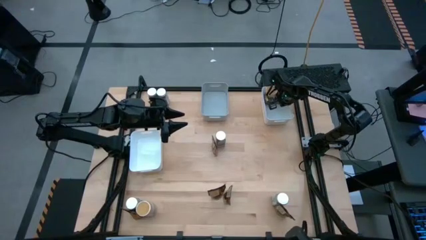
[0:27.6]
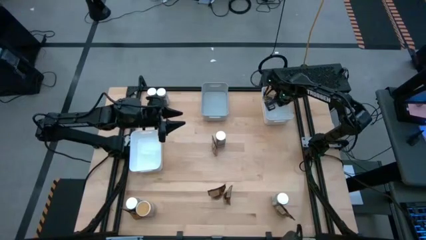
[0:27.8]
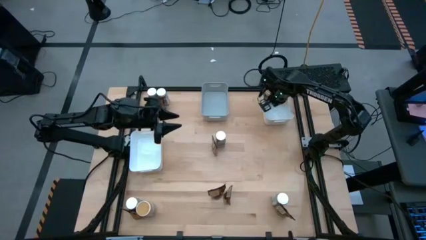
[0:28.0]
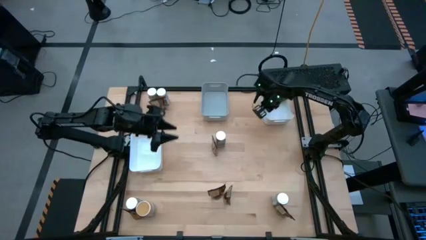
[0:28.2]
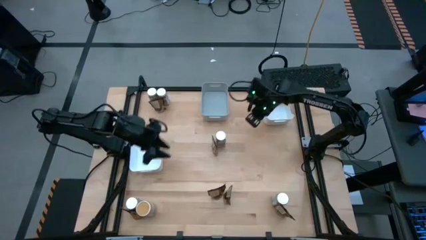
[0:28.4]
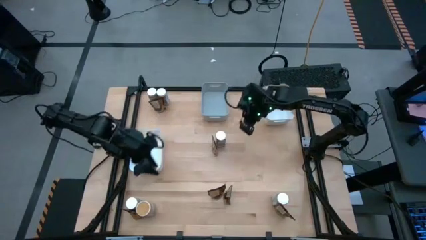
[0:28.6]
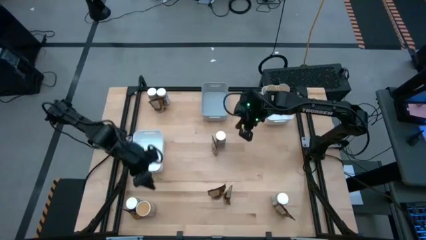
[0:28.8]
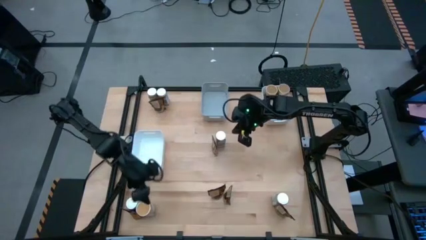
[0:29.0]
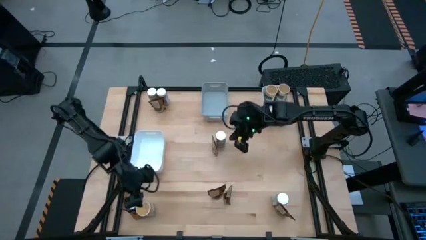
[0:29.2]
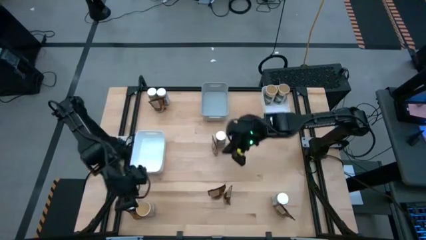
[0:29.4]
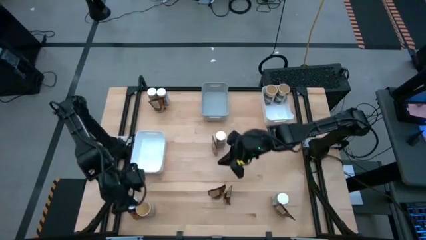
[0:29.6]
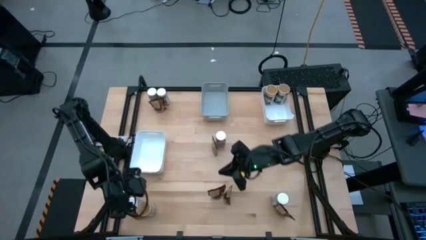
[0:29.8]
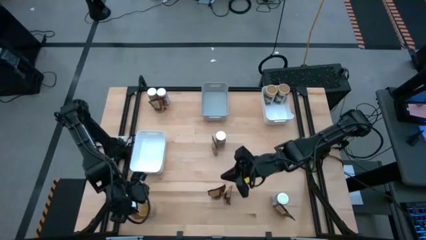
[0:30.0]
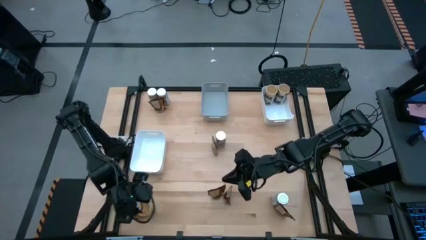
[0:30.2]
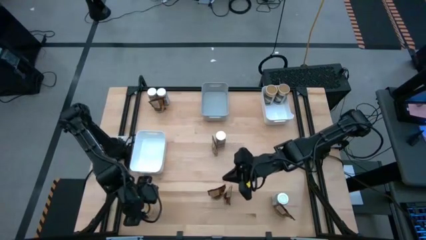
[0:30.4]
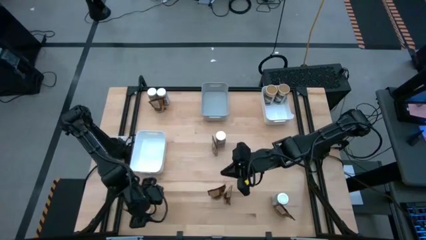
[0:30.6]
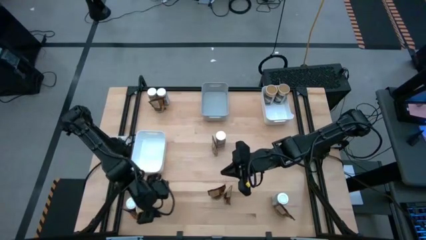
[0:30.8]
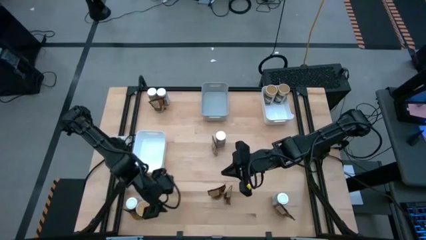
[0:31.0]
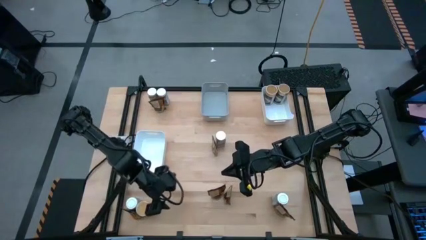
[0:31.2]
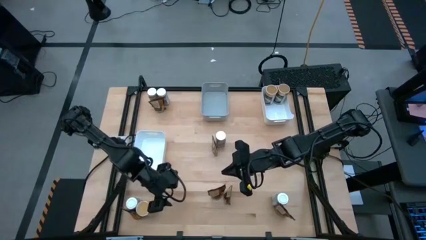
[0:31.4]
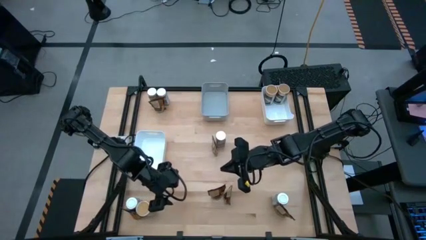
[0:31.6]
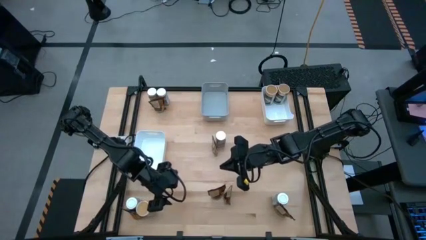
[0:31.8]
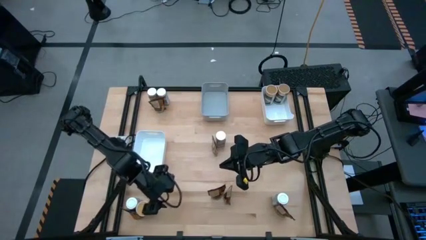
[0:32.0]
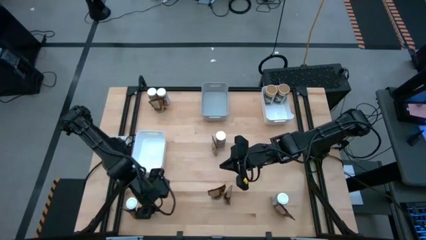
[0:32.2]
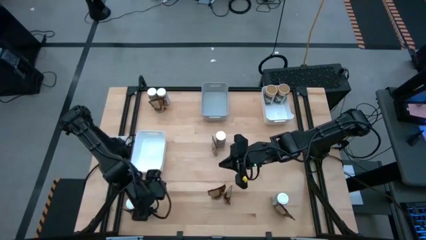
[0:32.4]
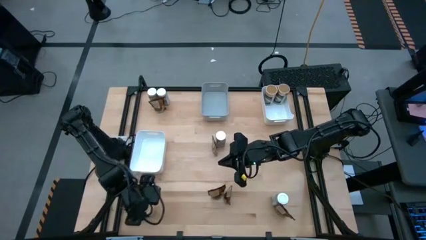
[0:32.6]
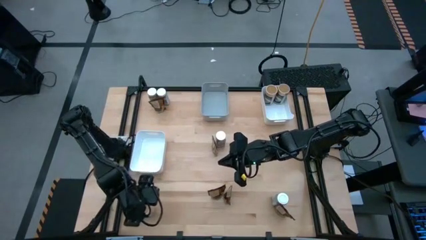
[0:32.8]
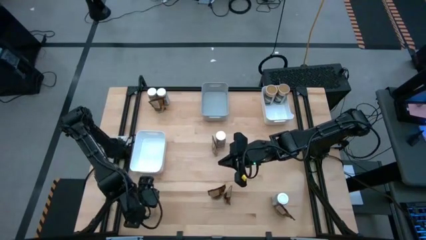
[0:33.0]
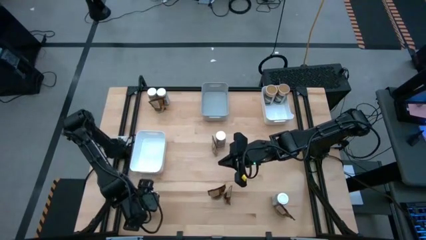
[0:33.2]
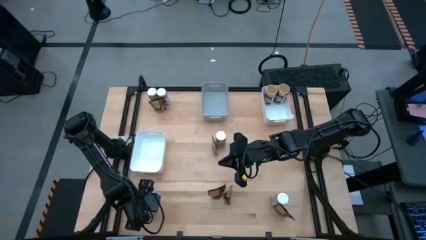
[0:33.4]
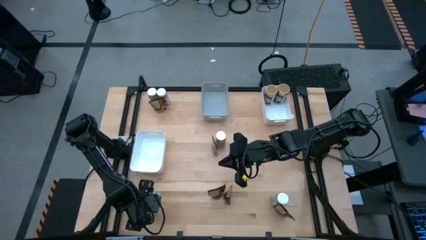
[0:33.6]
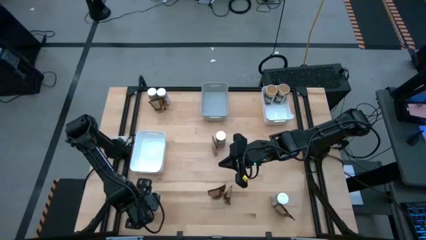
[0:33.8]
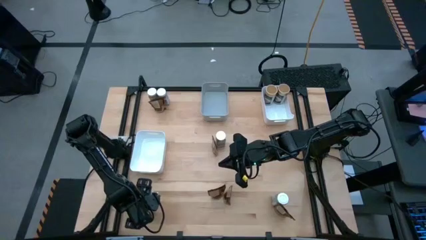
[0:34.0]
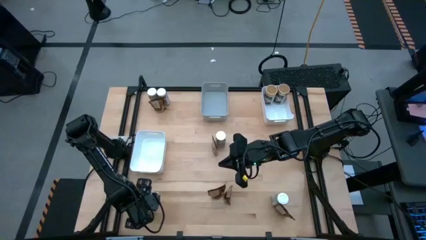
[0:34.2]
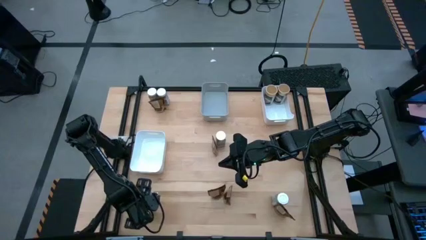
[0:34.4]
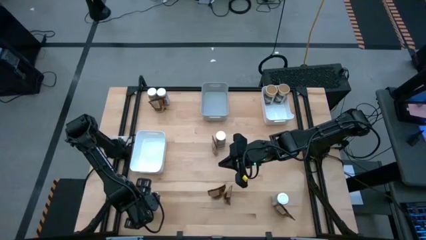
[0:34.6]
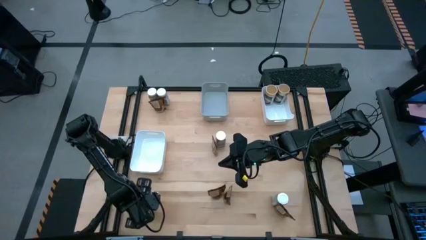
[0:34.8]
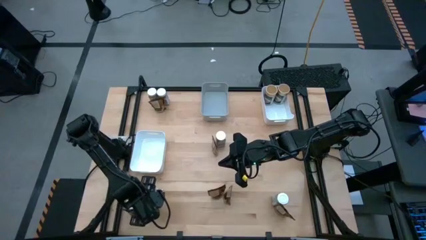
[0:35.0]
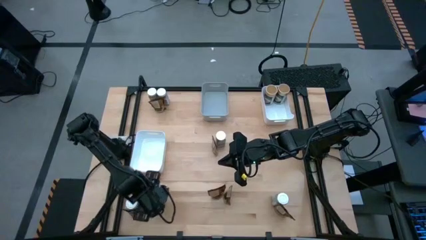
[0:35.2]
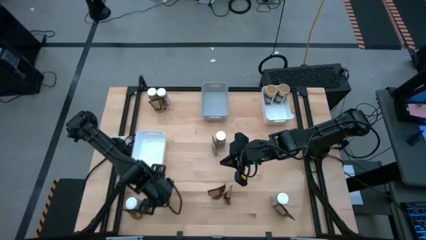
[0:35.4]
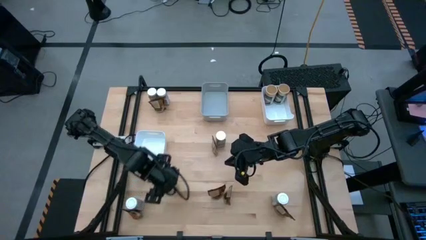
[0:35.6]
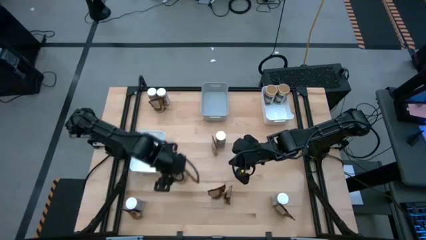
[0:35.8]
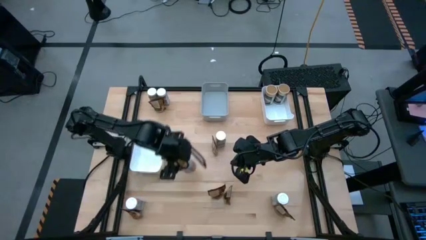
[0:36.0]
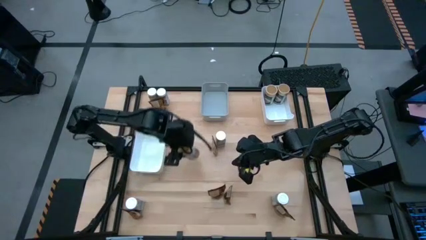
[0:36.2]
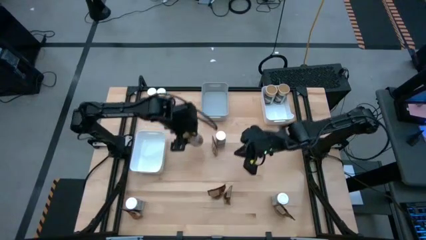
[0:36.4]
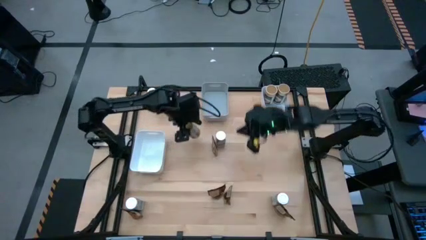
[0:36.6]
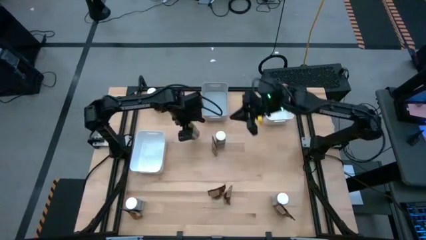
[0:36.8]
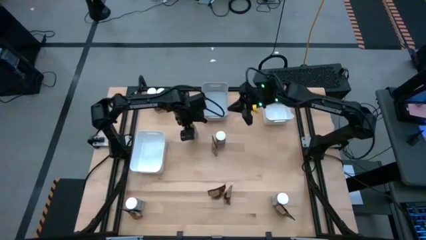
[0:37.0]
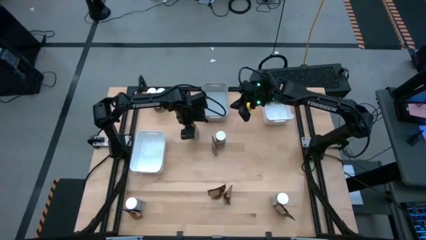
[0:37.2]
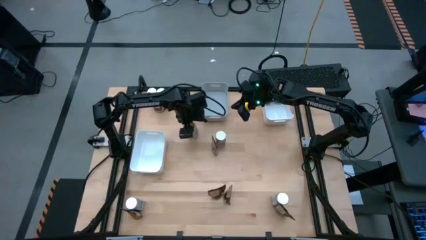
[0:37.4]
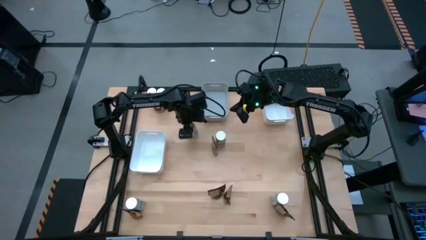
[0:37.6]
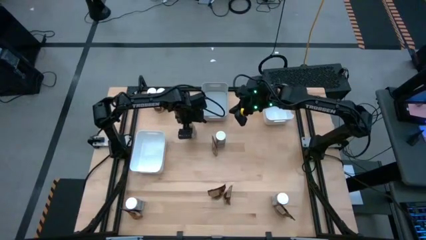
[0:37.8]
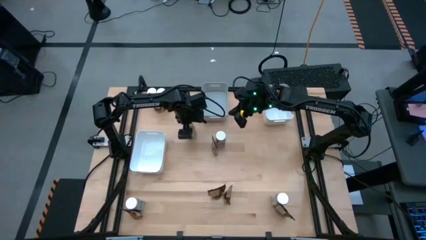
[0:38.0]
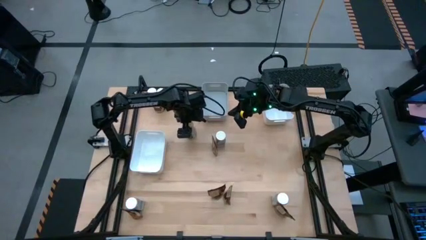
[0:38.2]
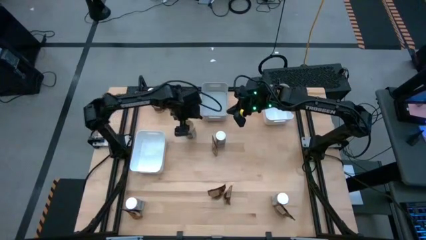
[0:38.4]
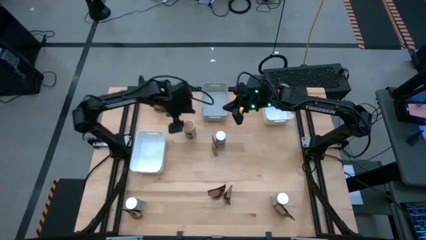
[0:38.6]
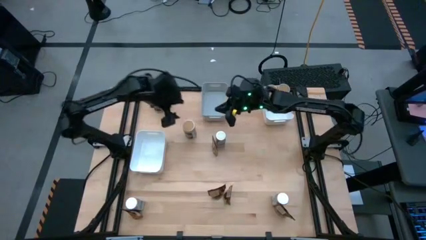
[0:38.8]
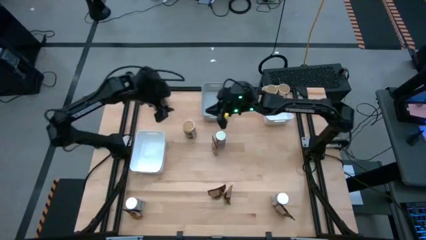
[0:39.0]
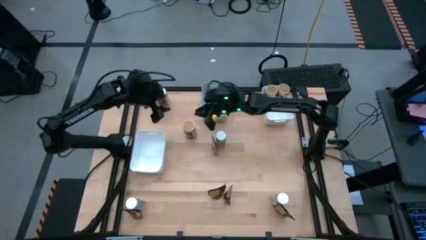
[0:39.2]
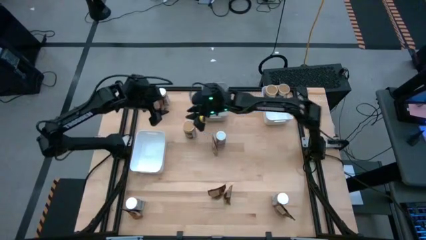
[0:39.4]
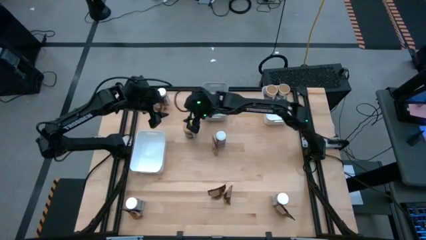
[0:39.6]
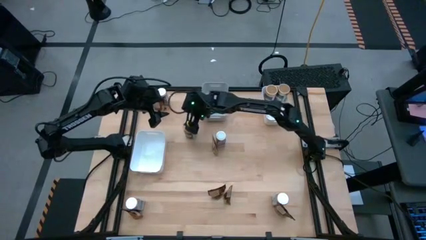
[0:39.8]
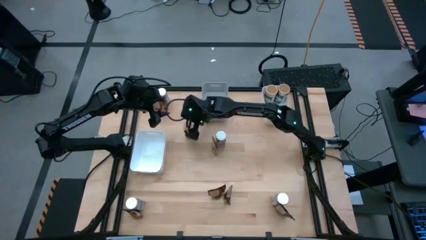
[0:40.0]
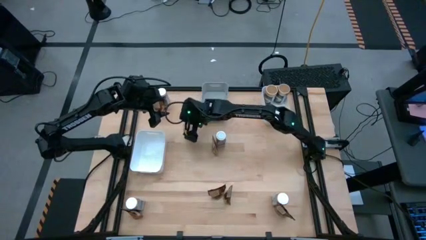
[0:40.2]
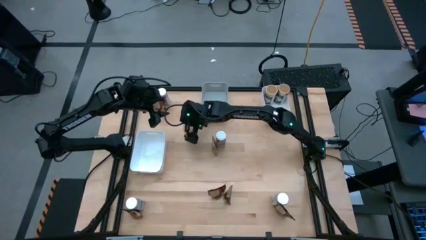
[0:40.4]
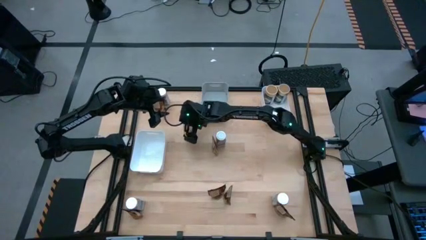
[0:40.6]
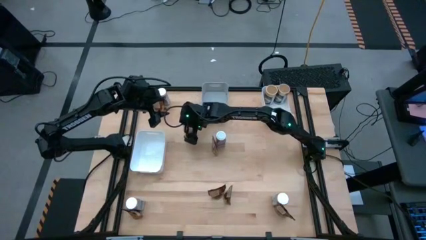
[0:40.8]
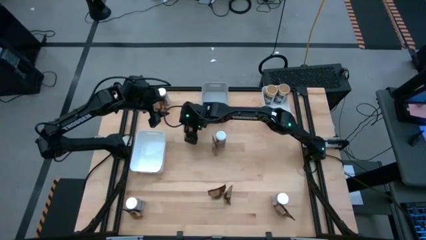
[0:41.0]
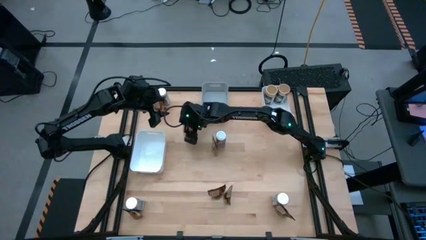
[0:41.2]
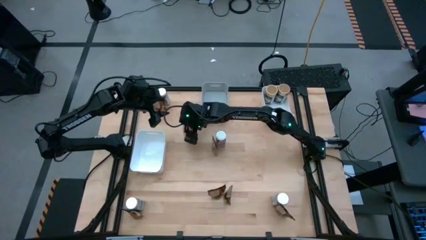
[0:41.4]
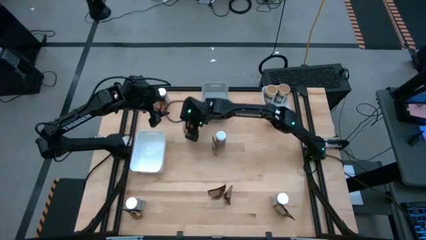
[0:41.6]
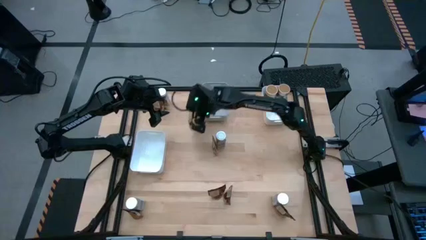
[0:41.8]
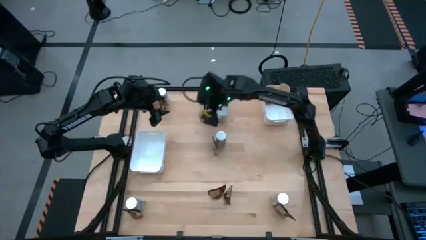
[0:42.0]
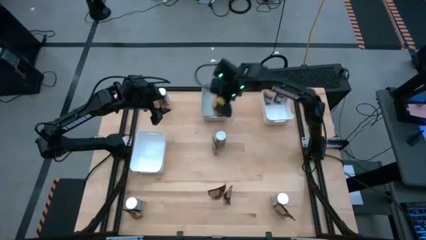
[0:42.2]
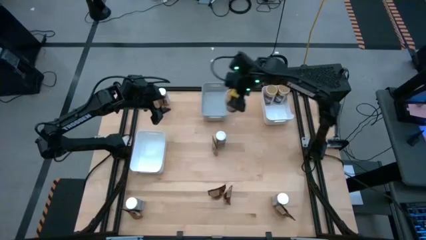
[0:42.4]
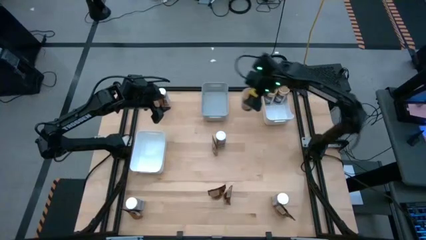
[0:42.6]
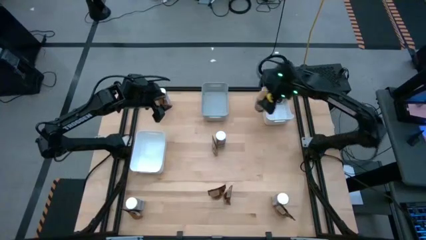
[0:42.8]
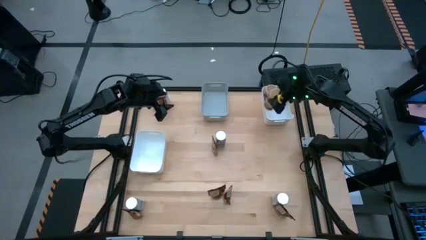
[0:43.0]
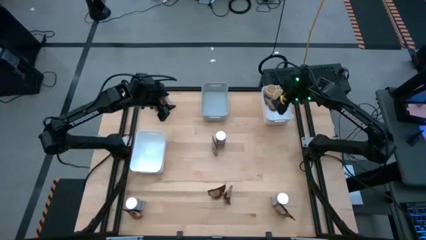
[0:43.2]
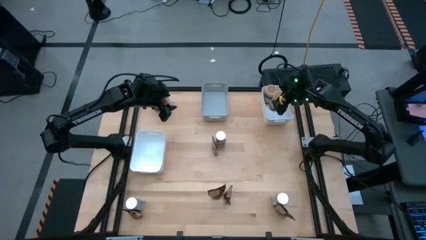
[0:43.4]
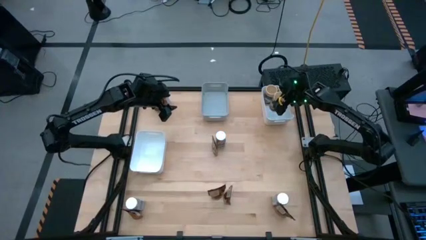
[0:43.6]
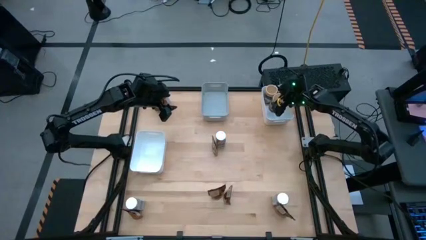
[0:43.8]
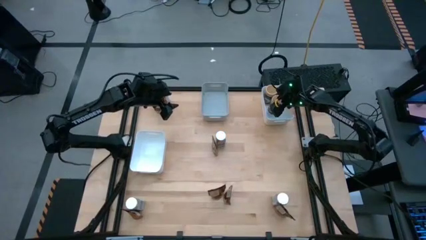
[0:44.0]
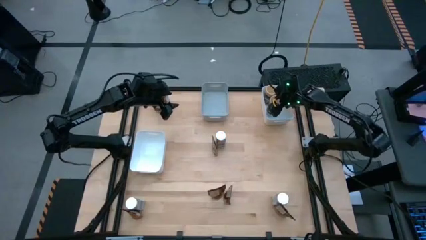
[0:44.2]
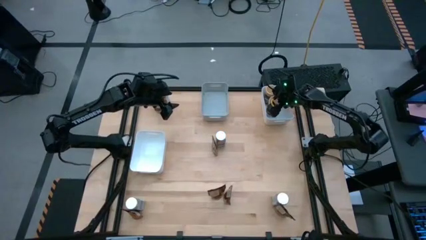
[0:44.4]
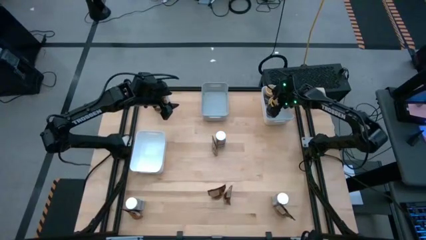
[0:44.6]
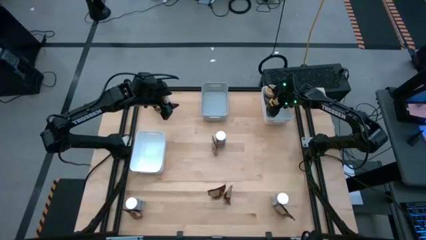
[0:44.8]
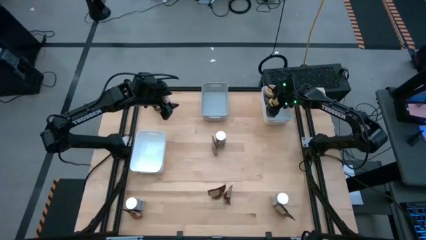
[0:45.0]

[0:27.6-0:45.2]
Task: Sort spices by type
Put the gold spice bottle into the top white bin
